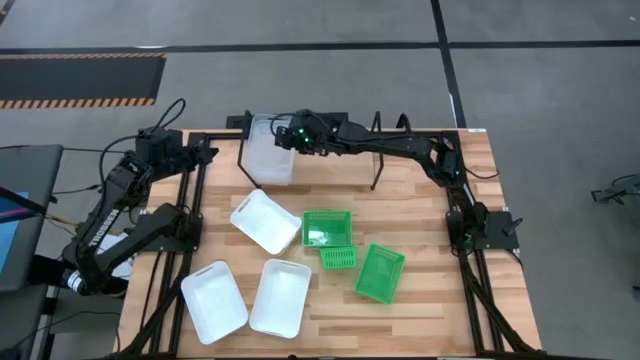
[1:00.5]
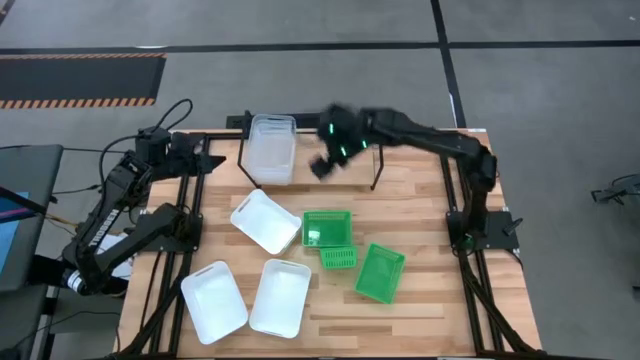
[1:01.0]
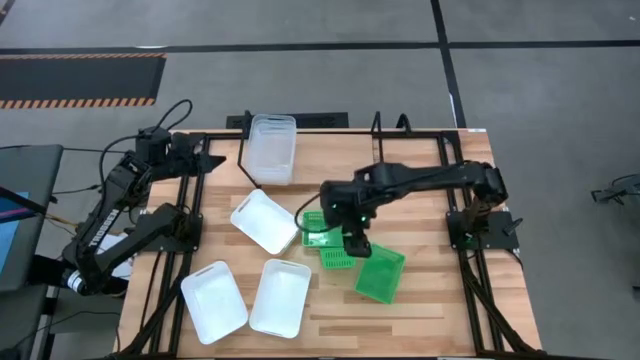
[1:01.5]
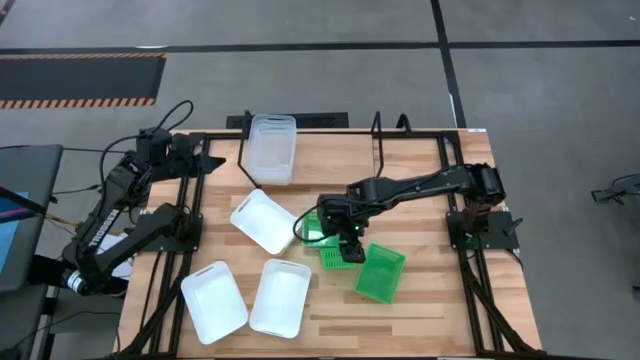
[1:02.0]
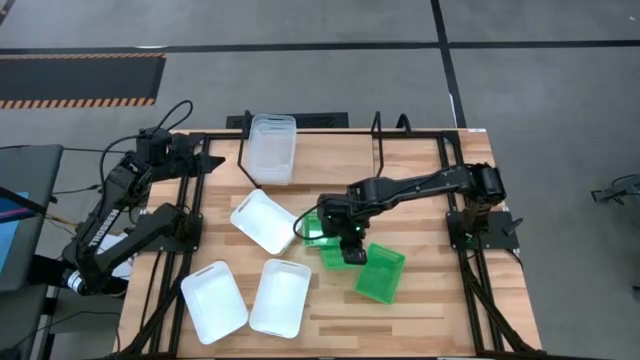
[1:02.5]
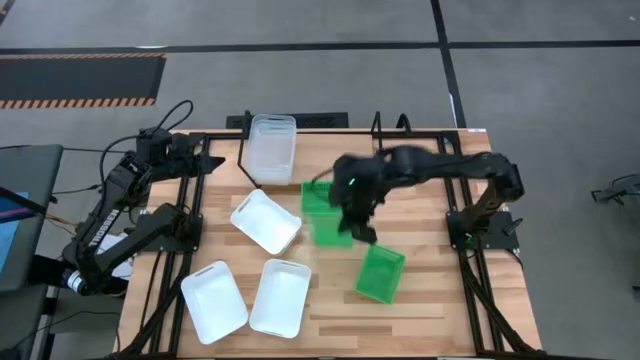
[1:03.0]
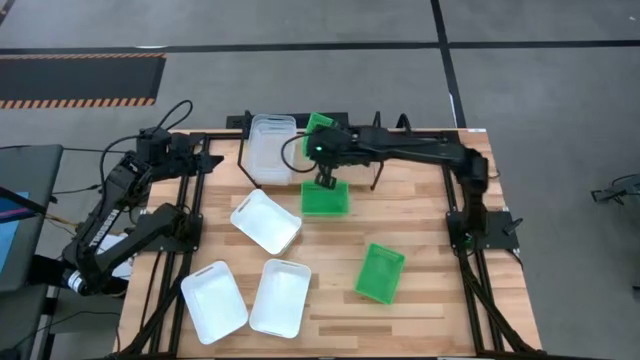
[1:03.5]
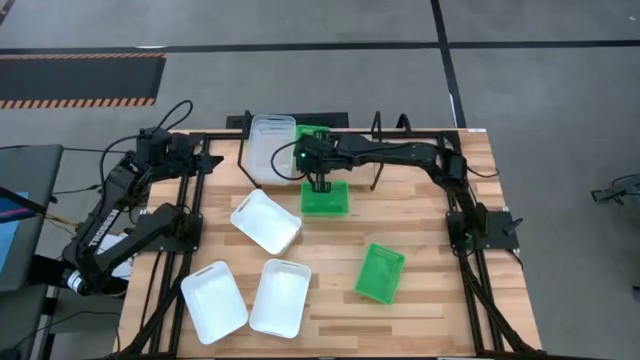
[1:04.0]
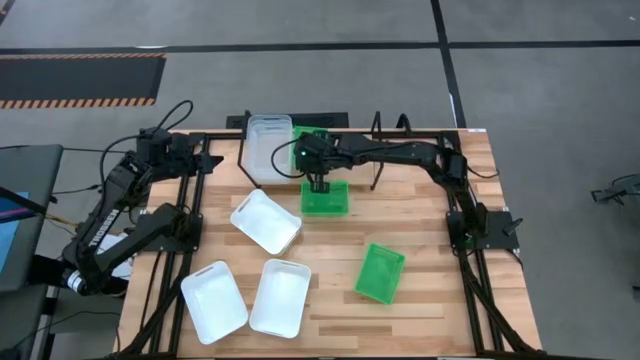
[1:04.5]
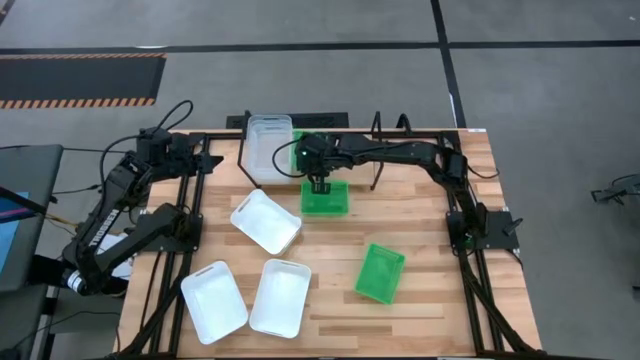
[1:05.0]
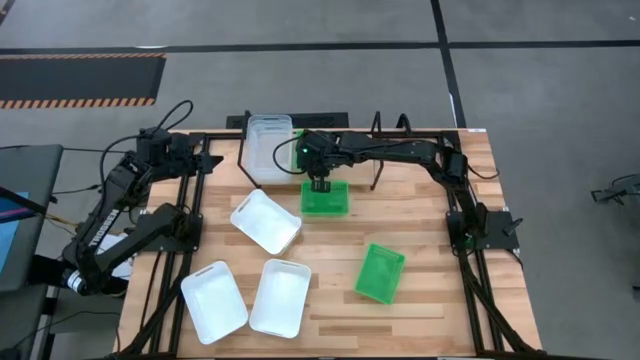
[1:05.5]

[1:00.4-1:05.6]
Task: Stack baskets on shelf by color
Put the center green bin on the shelf

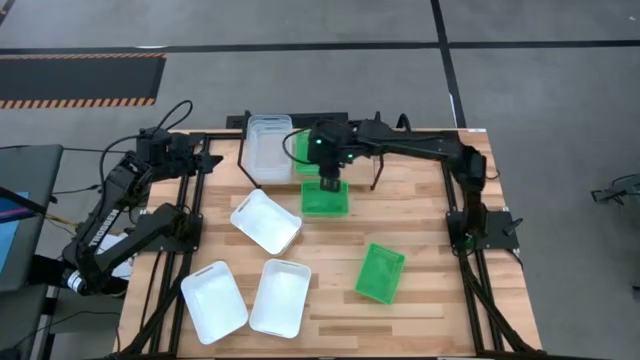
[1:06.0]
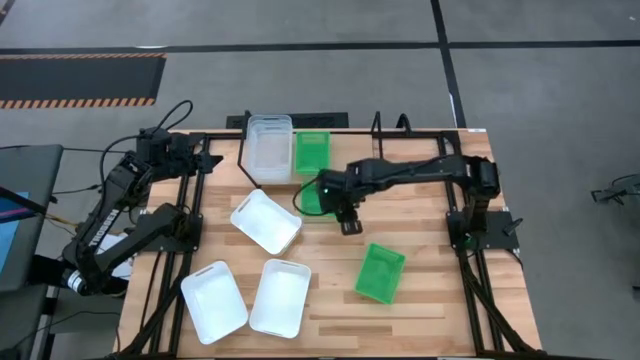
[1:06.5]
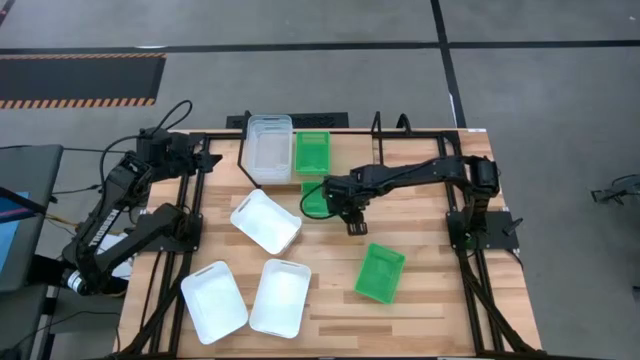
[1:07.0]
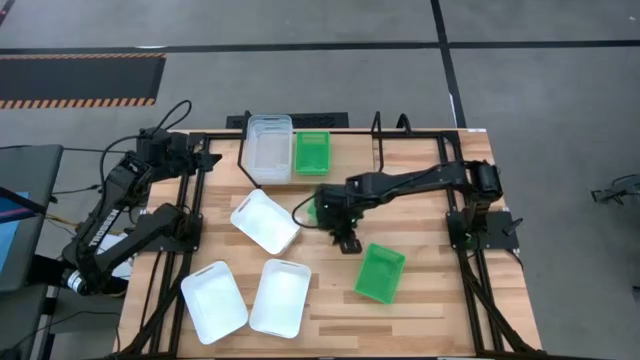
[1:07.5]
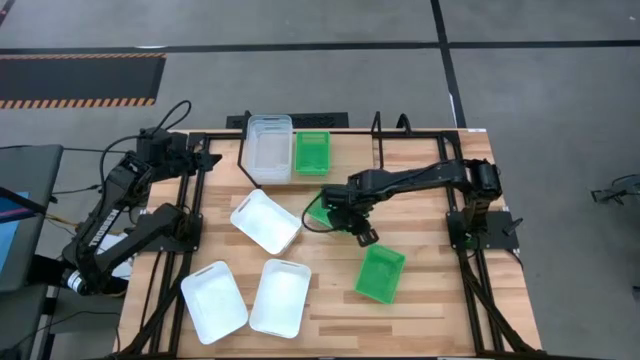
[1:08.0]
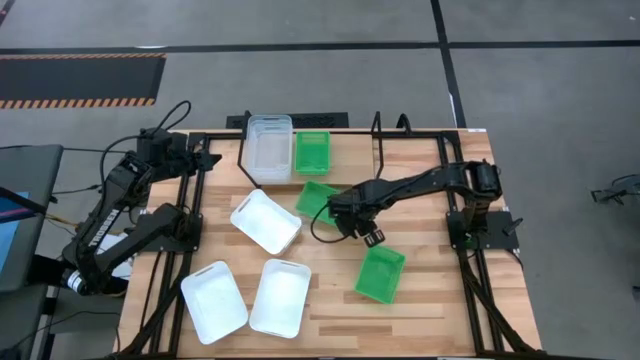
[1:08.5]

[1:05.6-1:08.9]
Stack the top green bin on top of the green bin on the shelf

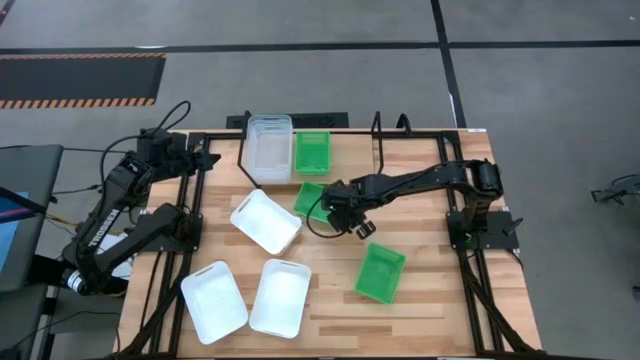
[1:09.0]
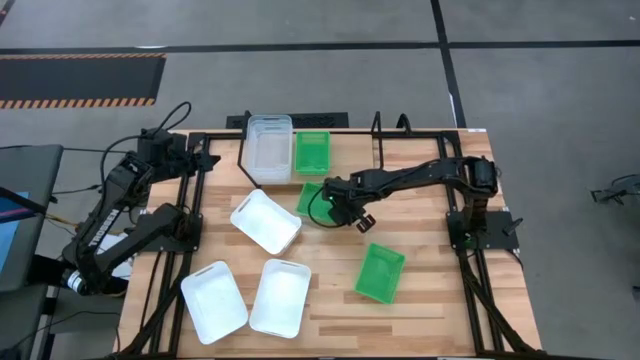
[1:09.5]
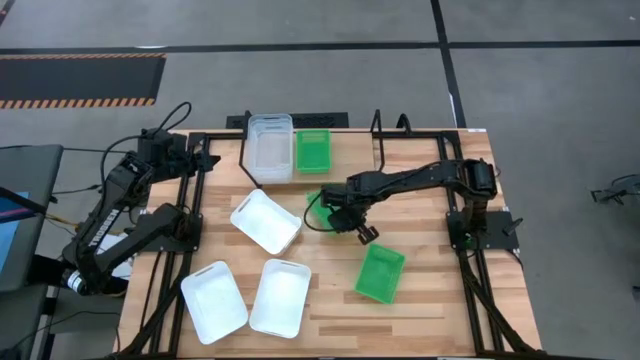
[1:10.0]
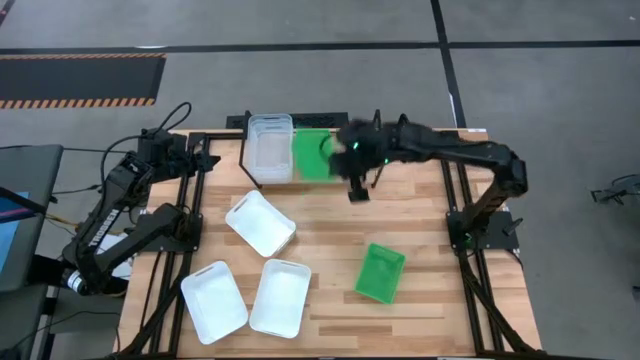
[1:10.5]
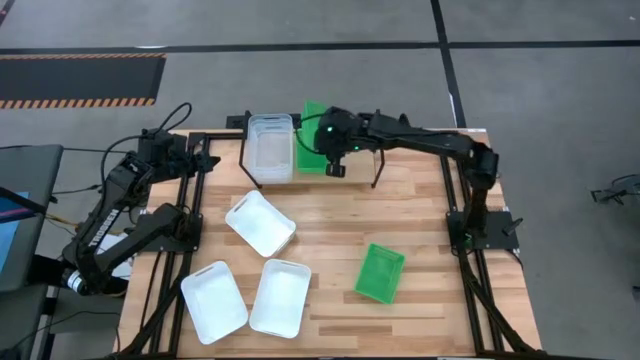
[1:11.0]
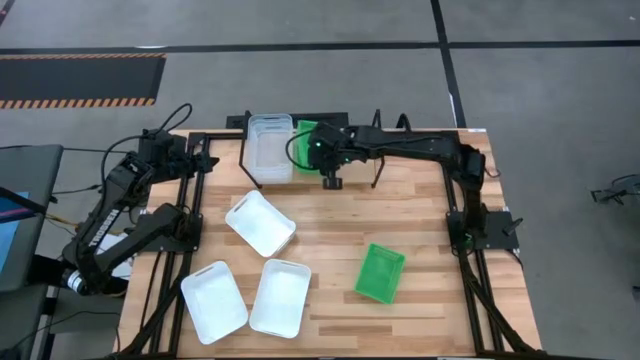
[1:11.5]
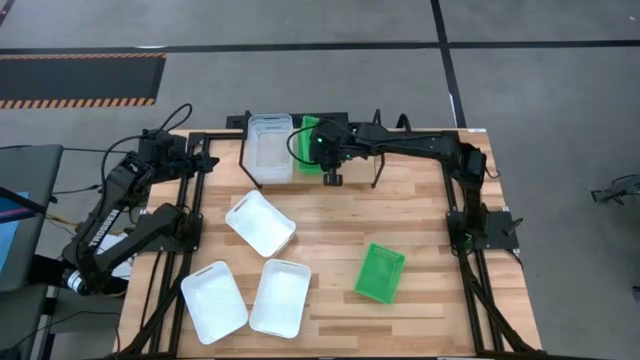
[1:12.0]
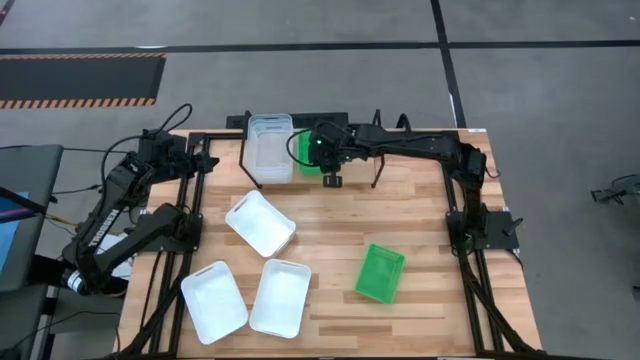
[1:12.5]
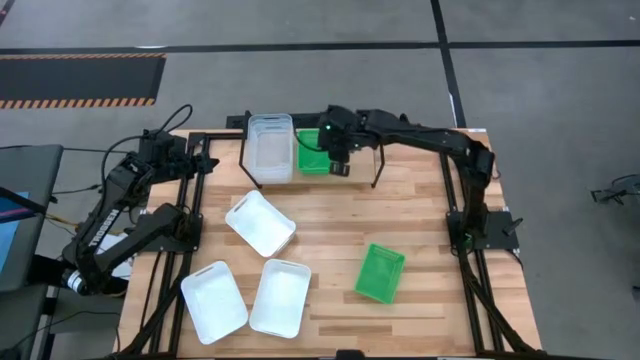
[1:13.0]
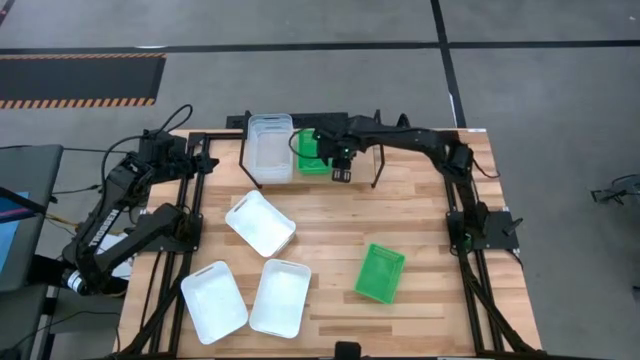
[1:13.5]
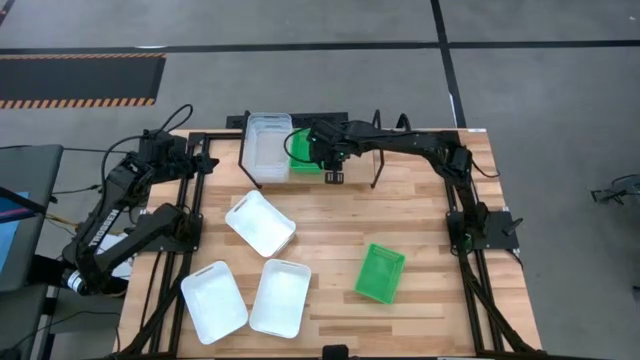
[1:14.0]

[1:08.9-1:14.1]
Stack the top green bin on top of the green bin on the shelf

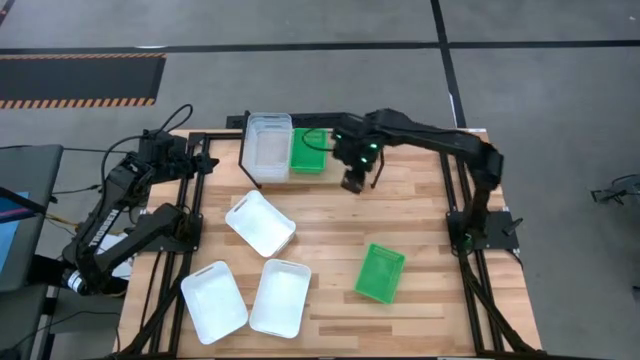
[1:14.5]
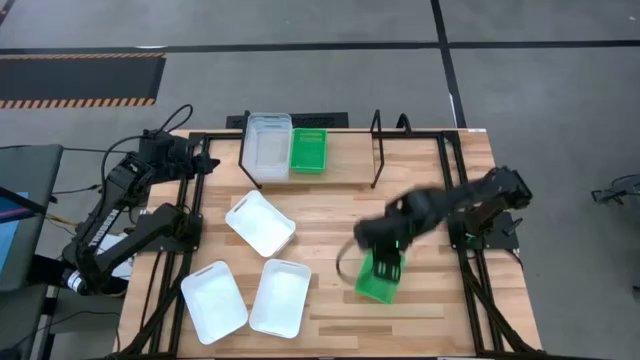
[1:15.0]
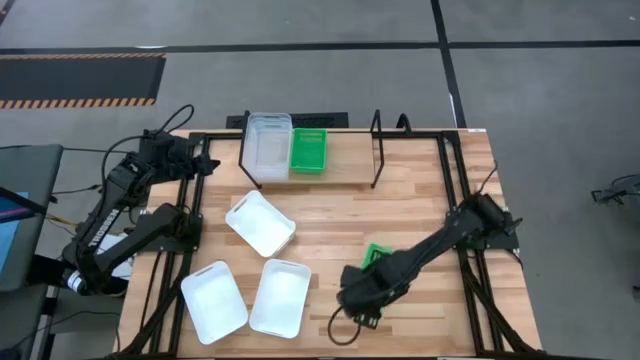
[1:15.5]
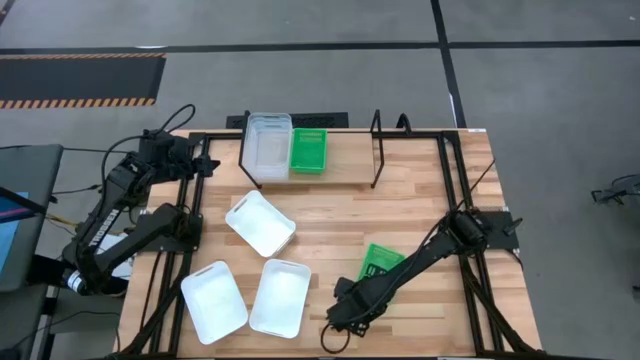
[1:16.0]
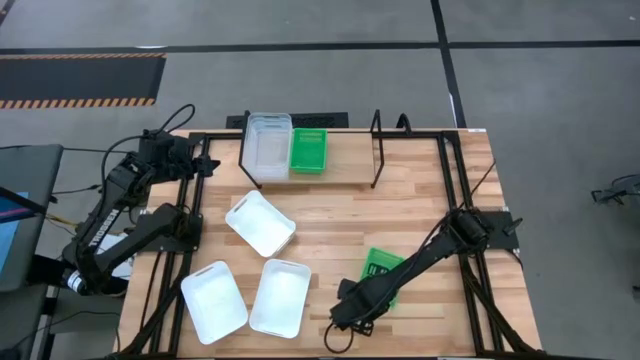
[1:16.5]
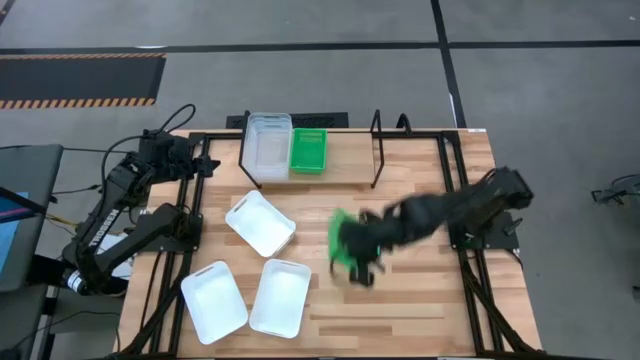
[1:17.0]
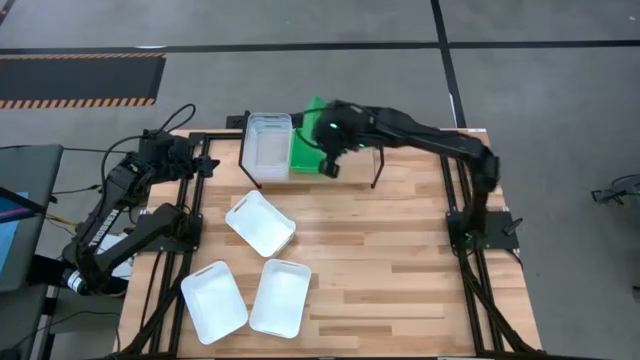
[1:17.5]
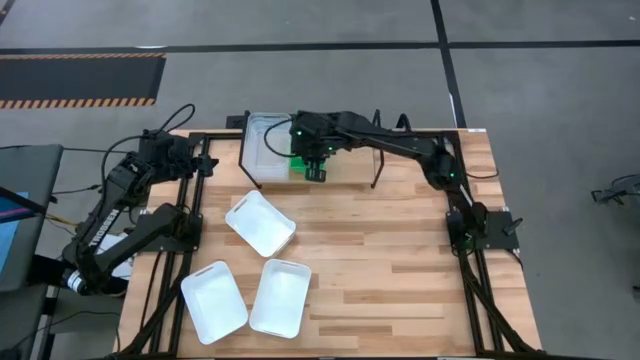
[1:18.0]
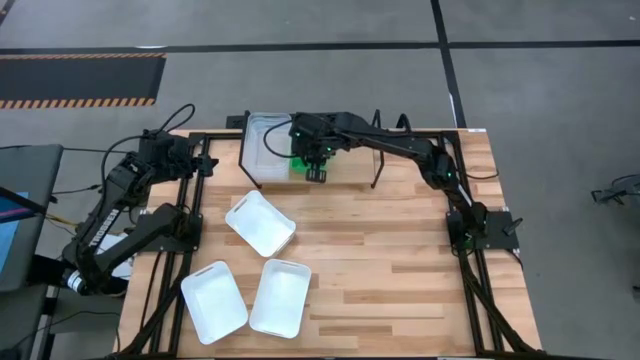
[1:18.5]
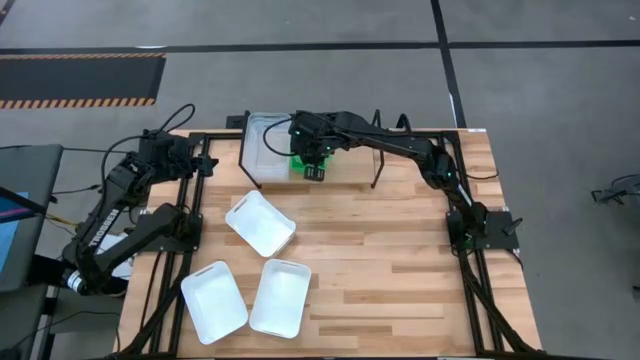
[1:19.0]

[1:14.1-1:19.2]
Stack the green bin on top of the green bins on the shelf

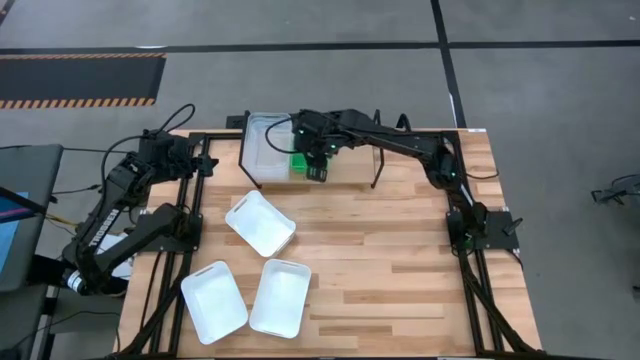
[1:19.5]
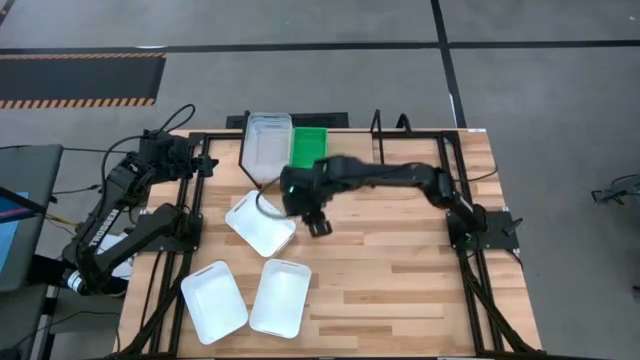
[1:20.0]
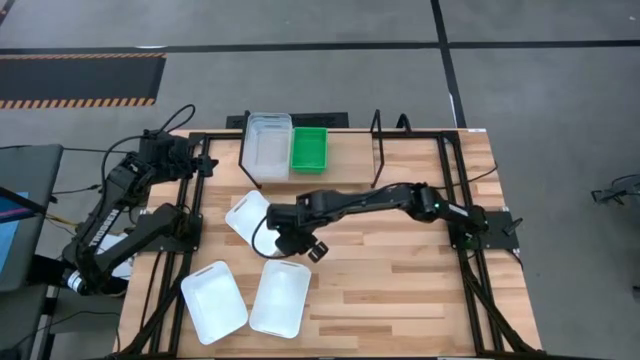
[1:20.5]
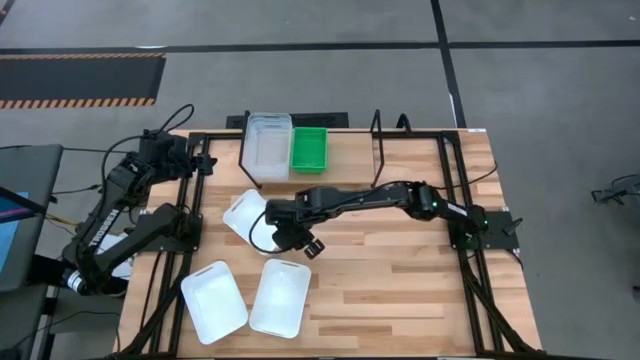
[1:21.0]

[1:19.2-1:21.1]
Put the top white bin on the shelf

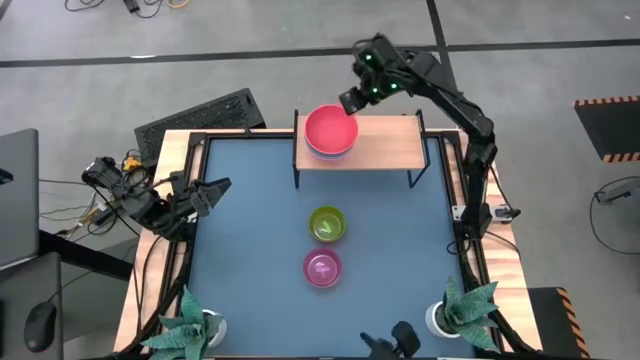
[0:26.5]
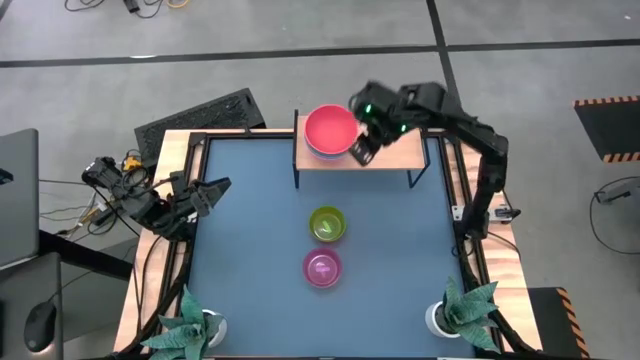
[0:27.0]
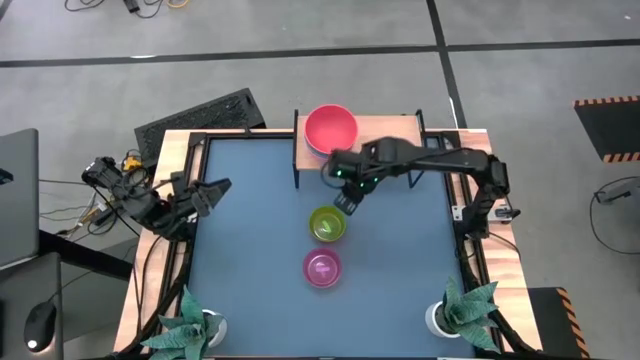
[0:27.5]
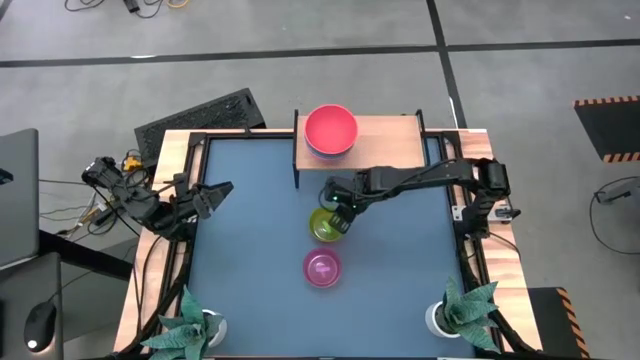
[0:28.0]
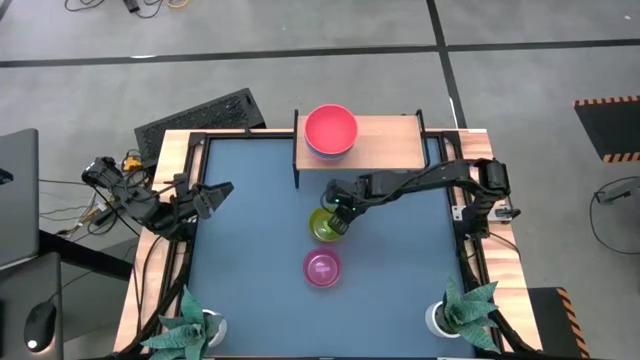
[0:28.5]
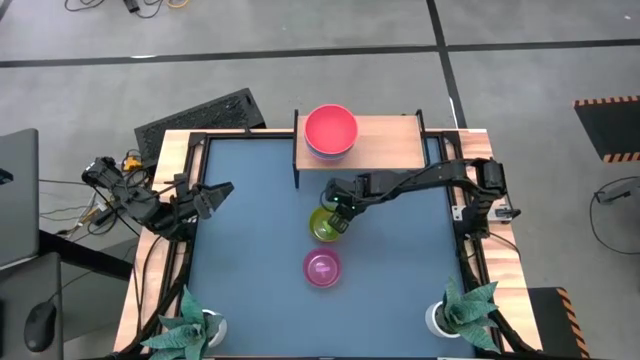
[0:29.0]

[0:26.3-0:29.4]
Task: Place and stack bowls onto a shelf
Put the small green bowl on the shelf
